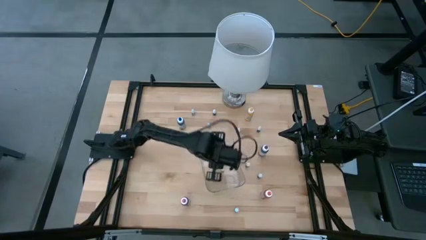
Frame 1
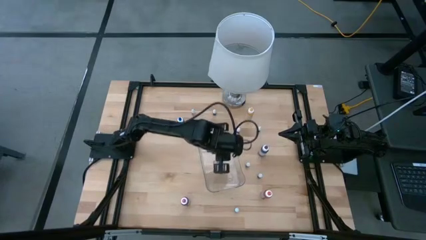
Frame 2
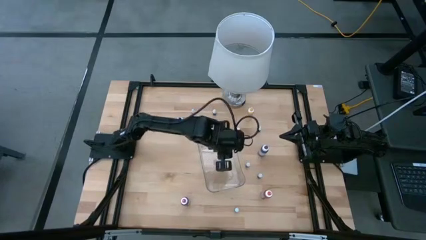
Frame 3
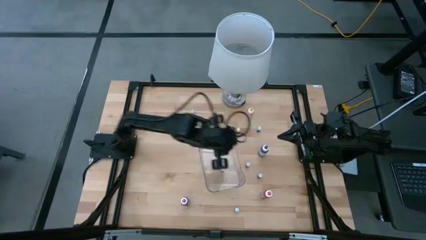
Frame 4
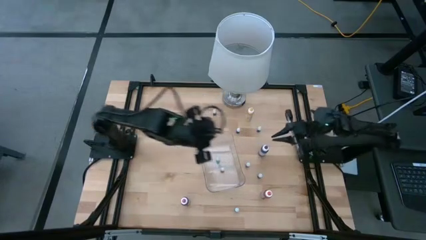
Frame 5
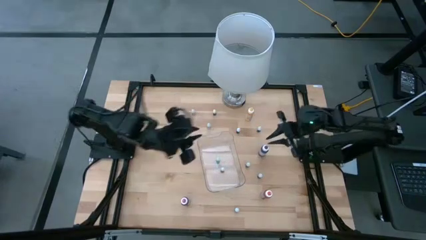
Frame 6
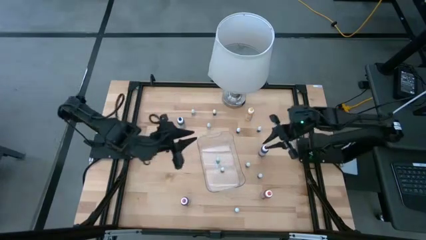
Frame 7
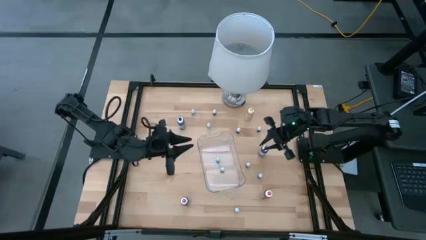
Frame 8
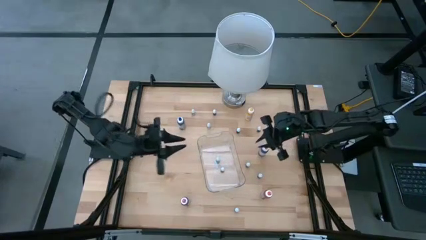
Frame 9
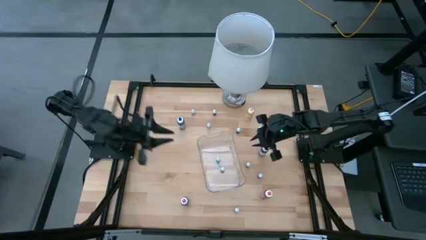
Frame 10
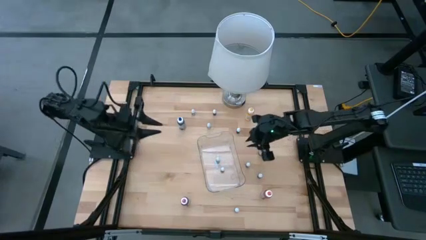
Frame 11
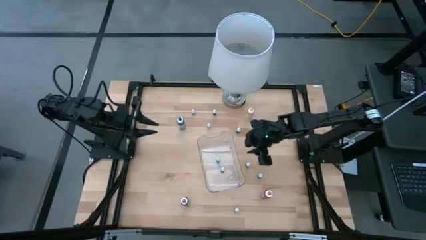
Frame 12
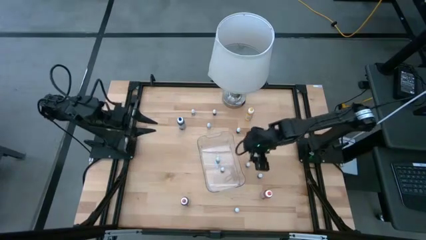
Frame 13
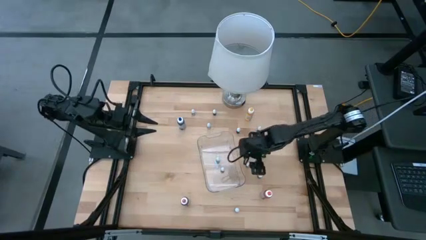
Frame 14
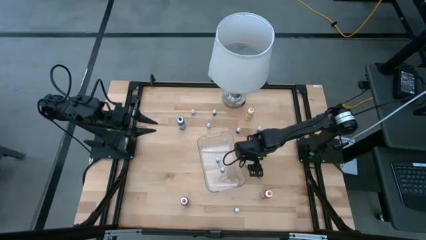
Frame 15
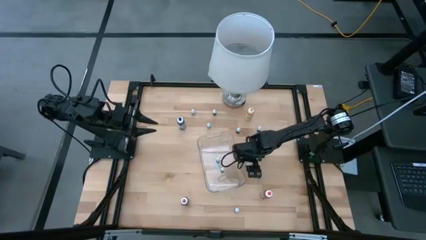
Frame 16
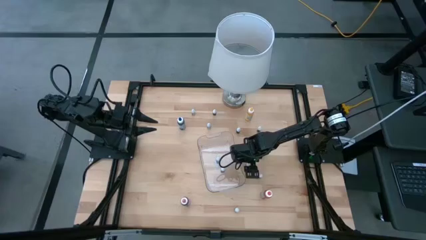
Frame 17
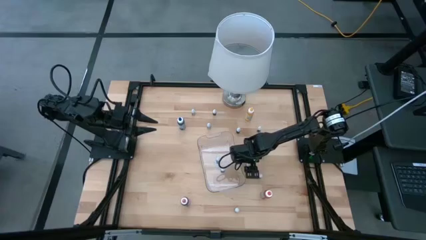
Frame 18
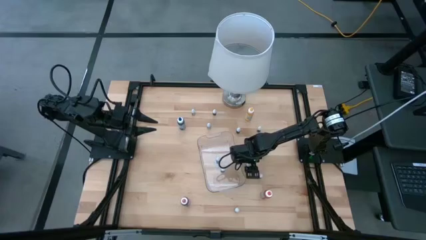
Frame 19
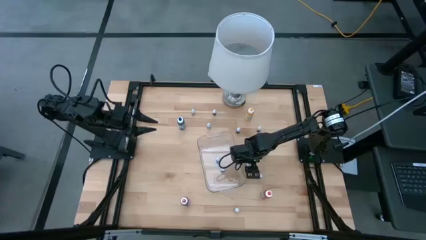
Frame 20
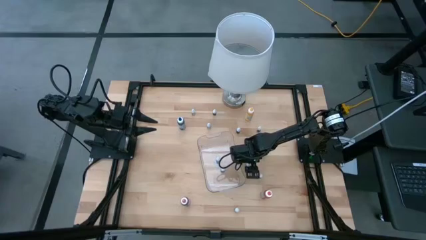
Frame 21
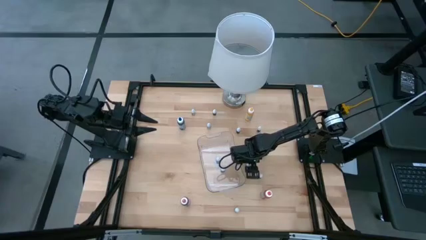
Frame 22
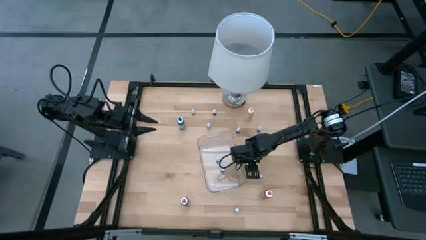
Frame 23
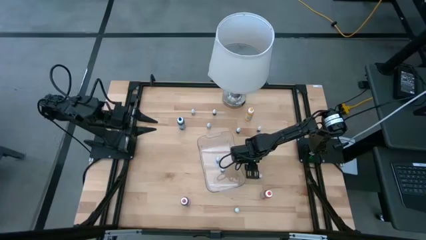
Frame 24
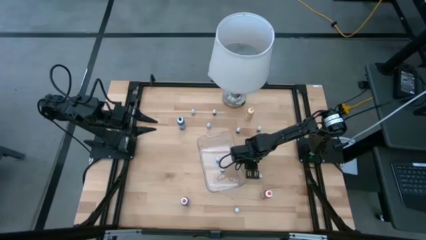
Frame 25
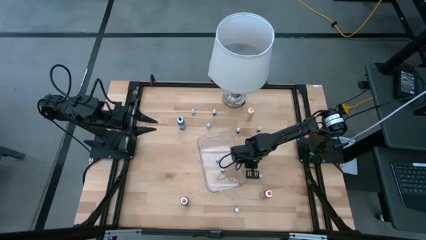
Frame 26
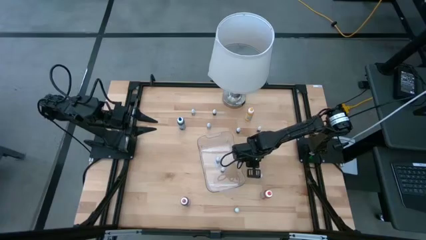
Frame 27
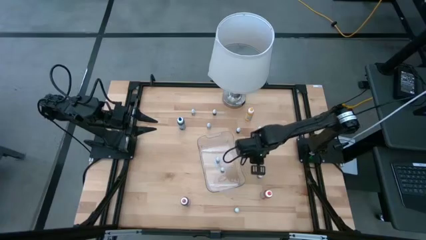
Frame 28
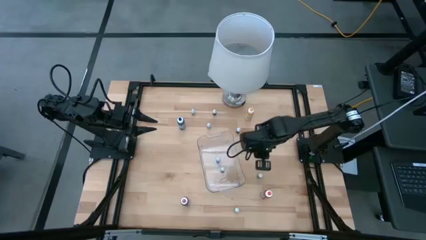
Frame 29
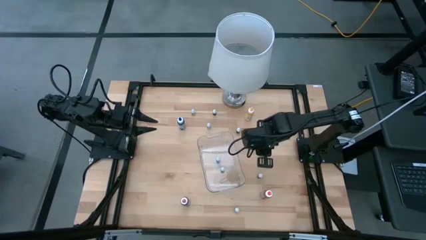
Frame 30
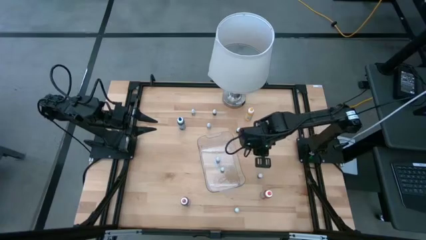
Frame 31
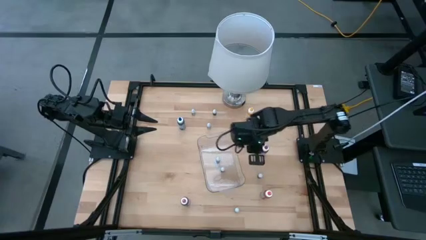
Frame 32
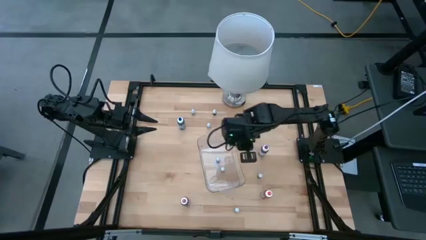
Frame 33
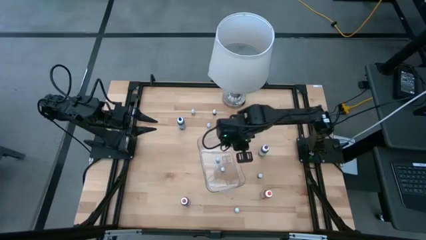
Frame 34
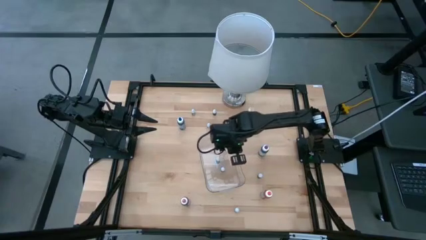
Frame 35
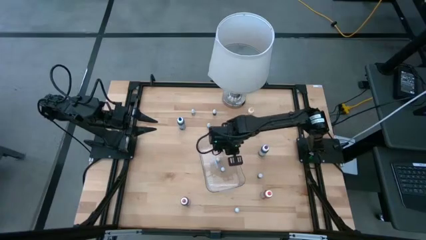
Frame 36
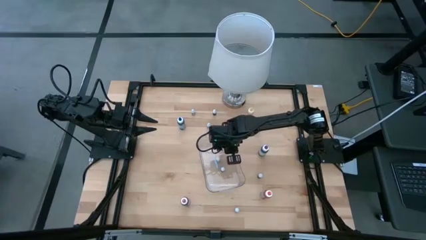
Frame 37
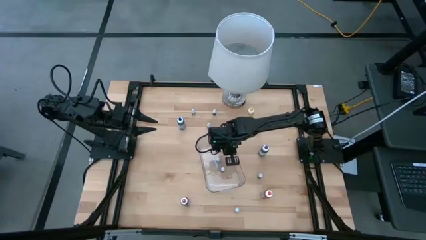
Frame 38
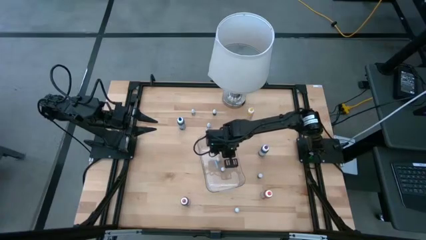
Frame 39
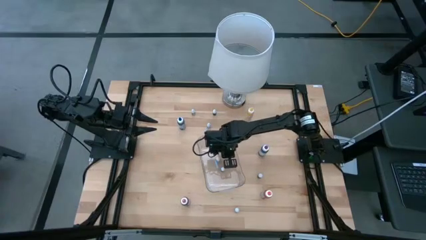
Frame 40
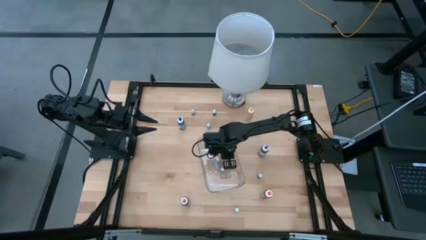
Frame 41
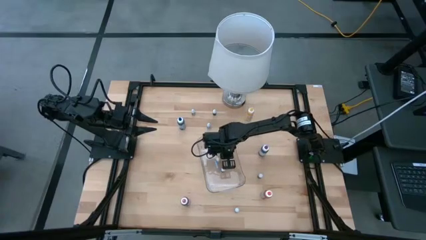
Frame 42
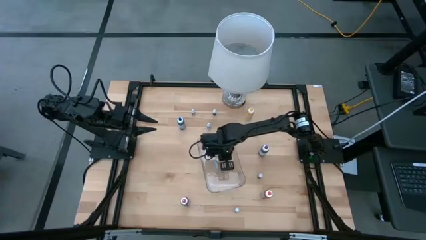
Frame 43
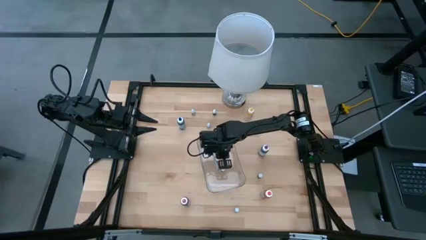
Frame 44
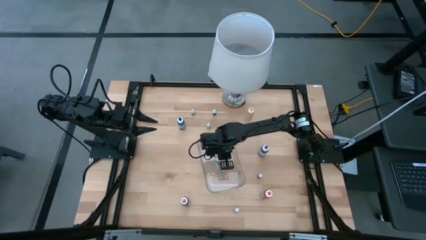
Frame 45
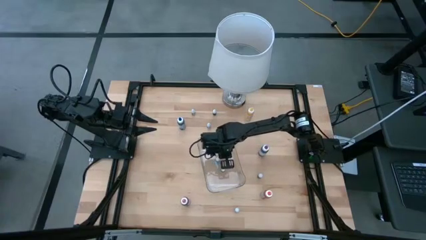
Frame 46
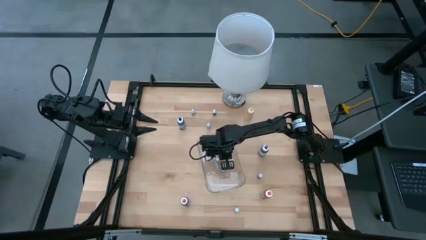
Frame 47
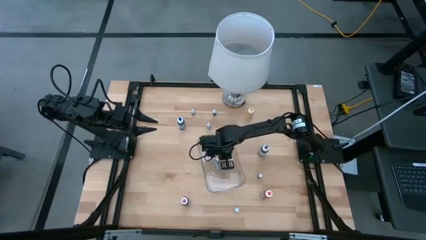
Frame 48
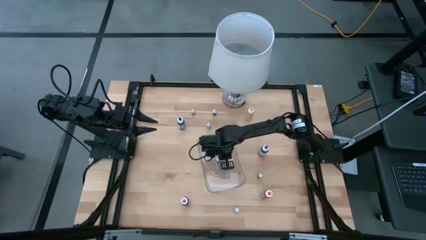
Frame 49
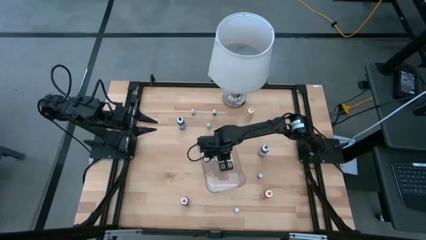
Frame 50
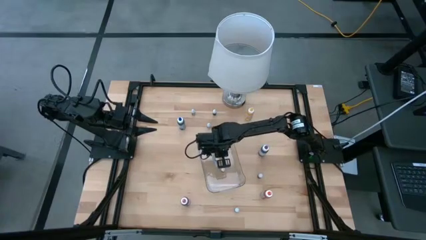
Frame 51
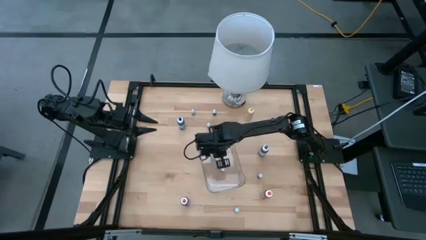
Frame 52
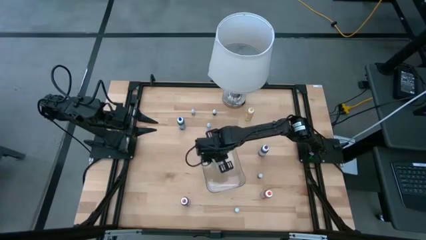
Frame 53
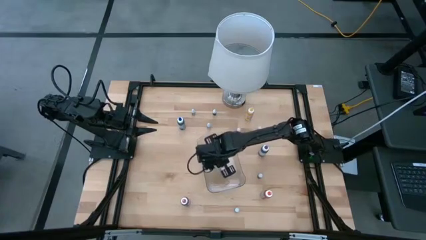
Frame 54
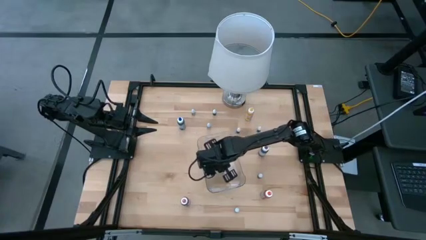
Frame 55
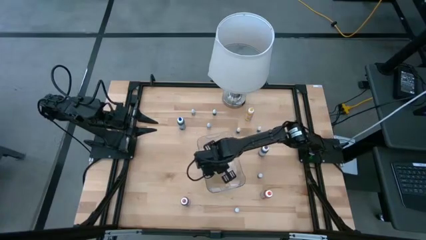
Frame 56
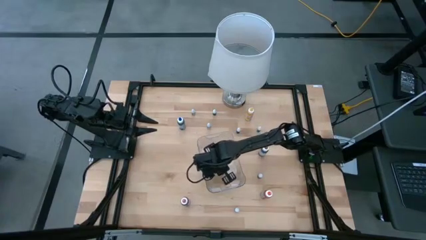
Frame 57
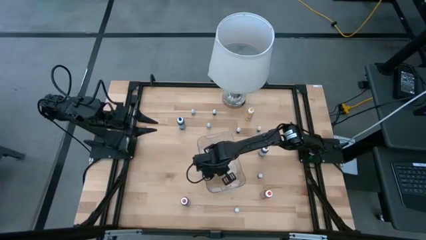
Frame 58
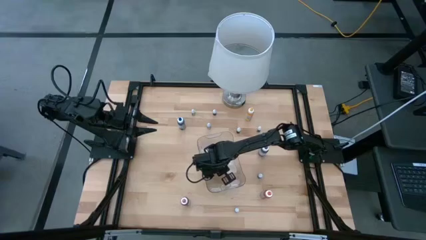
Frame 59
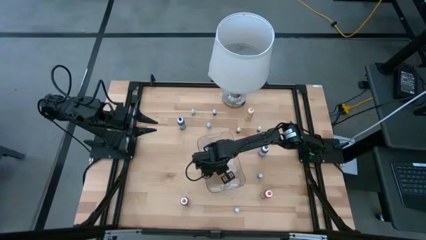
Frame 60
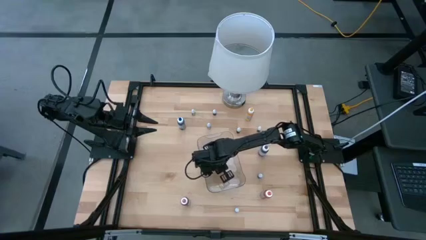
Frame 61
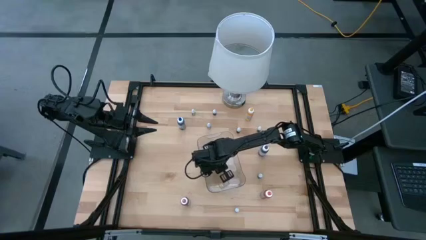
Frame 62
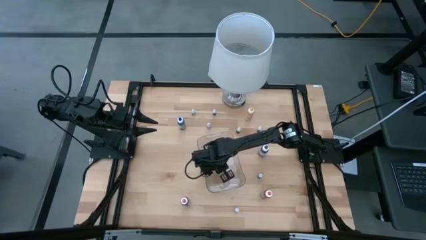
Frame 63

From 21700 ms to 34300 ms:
Task: Pick & Place food coloring
Put the small brown food coloring bottle into the transparent bin

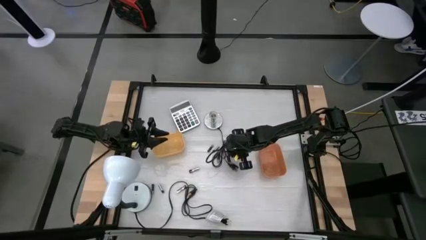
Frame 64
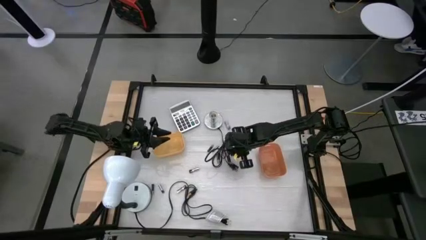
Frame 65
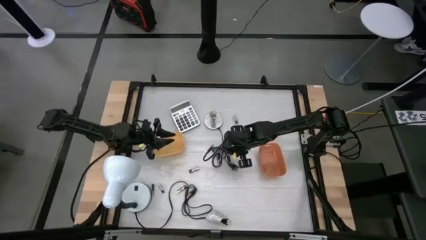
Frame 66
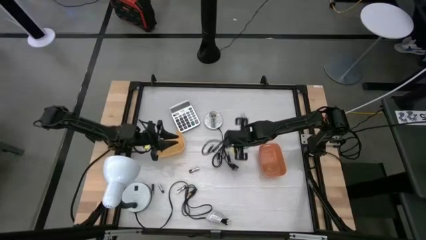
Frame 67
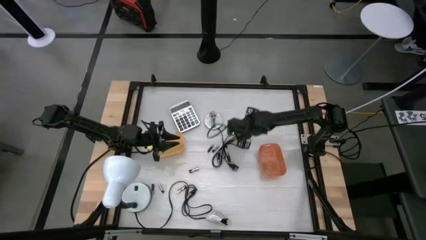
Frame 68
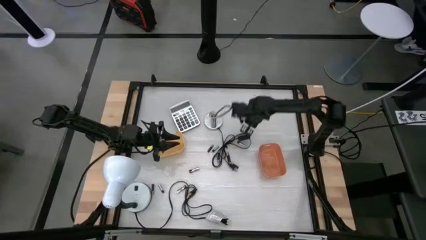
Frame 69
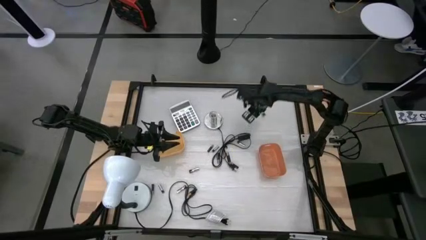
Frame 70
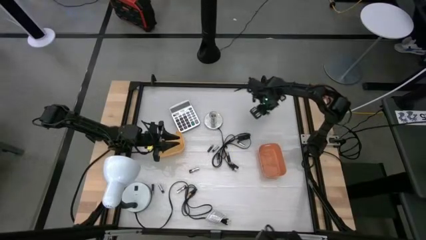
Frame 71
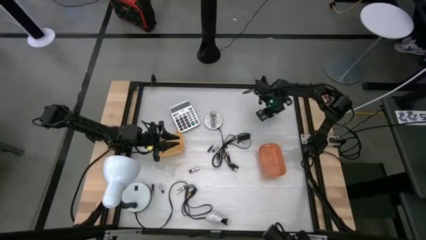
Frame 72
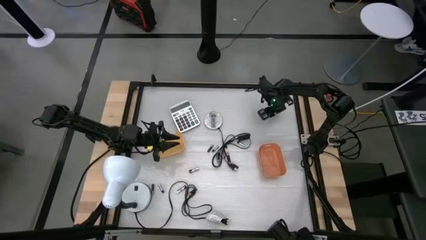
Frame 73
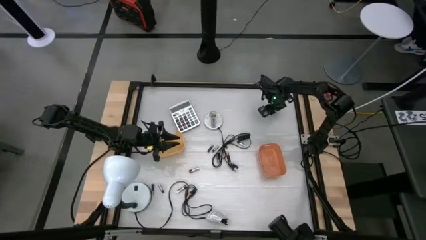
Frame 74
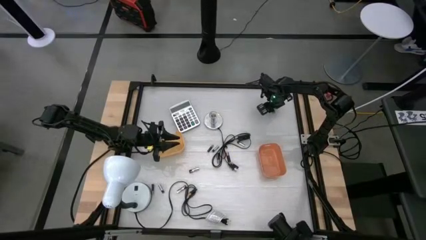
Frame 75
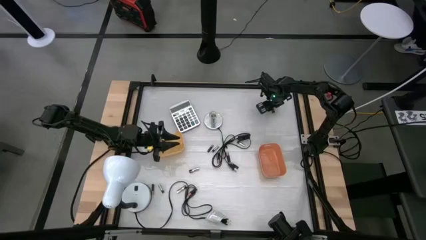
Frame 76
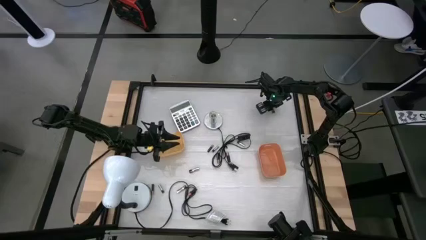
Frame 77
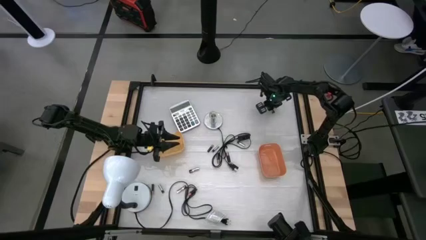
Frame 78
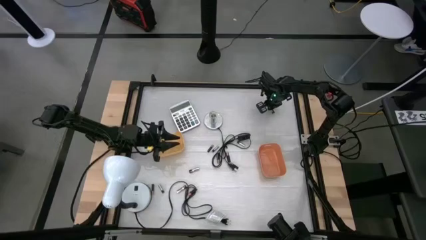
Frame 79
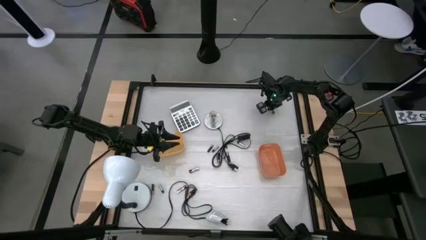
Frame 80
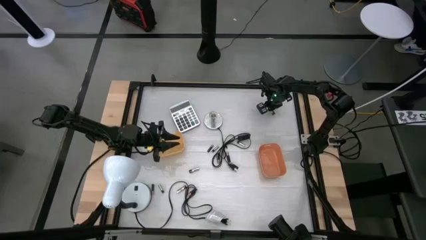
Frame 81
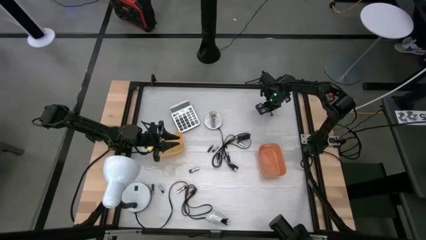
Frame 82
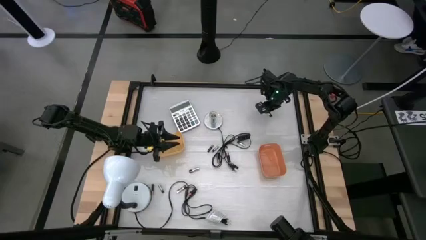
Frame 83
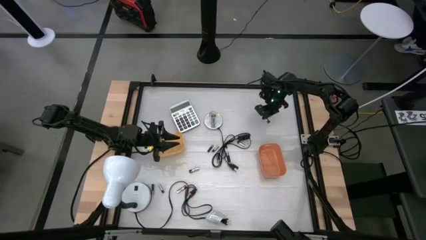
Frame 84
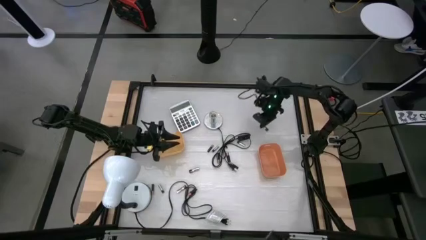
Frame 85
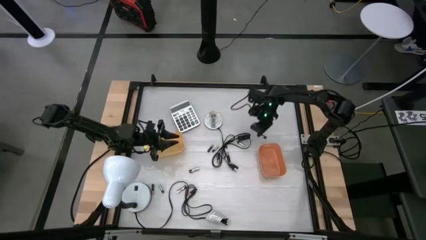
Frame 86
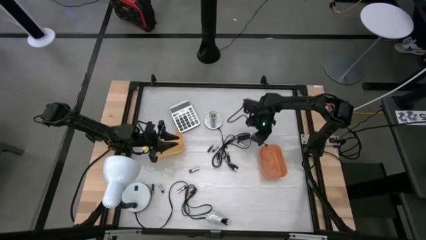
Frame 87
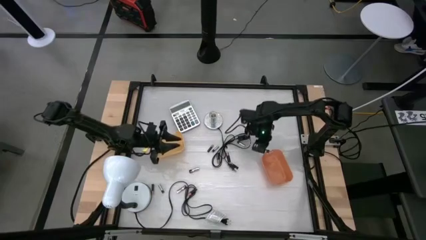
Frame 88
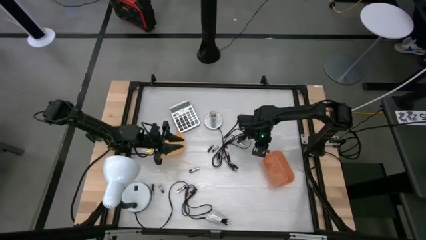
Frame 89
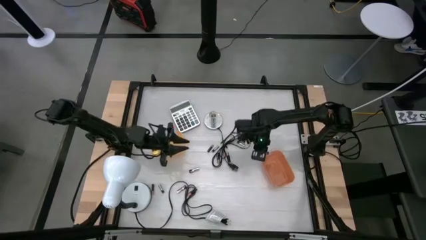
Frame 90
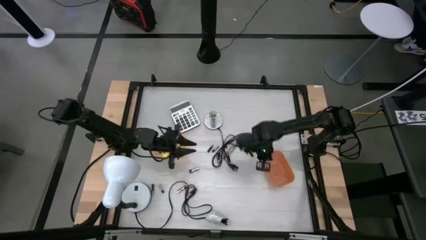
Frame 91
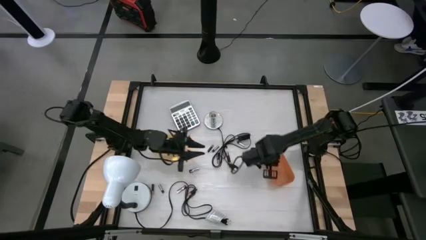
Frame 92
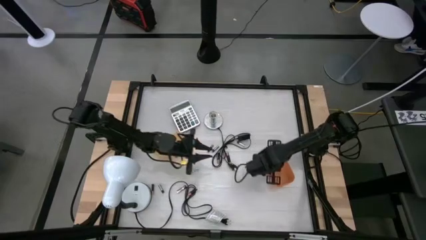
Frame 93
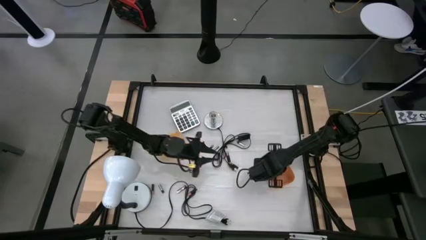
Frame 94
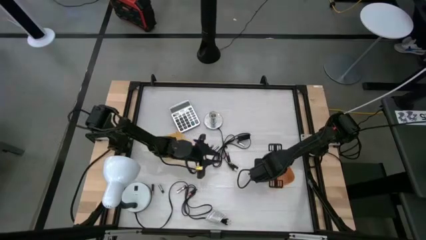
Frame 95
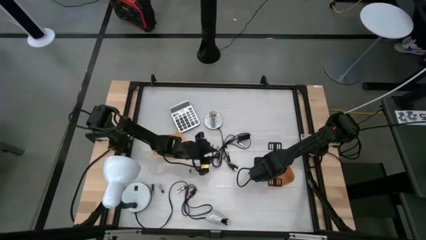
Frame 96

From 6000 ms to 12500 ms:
Task: Sort batteries
Put the silver battery into the orange bin
